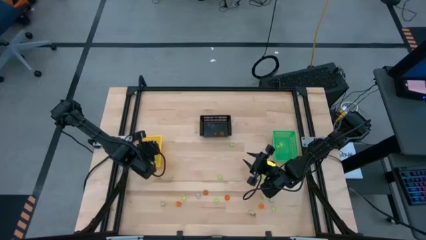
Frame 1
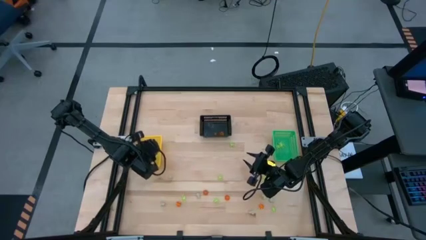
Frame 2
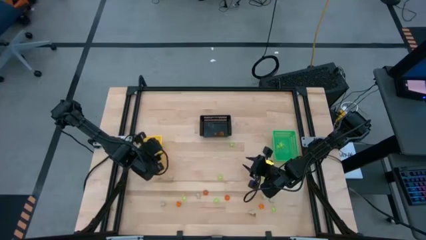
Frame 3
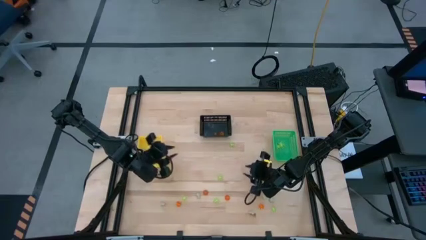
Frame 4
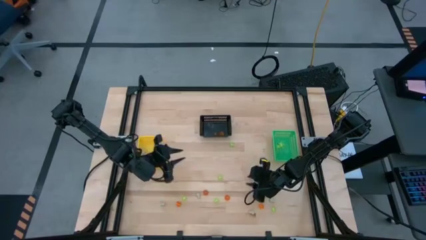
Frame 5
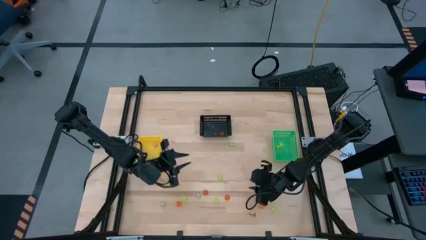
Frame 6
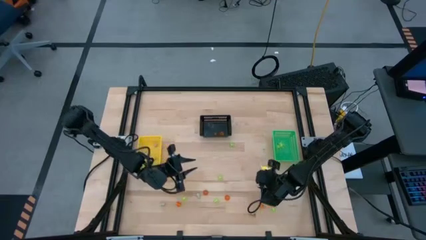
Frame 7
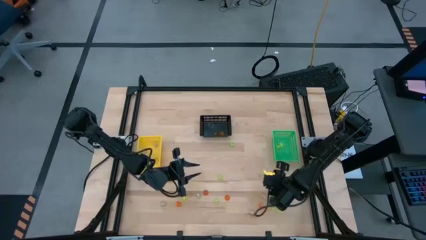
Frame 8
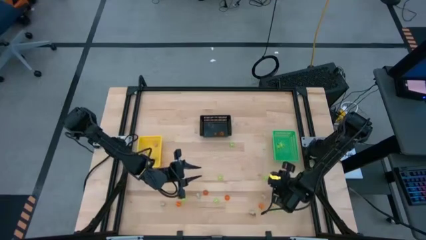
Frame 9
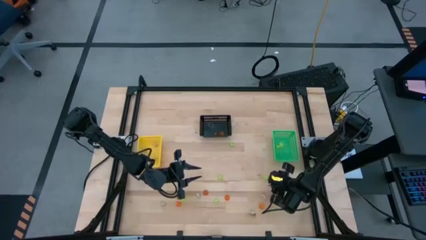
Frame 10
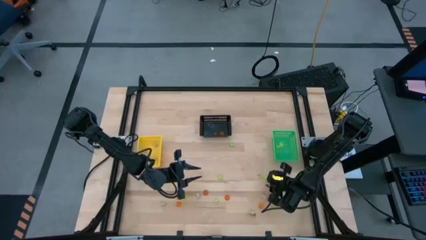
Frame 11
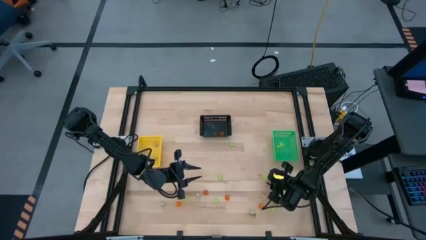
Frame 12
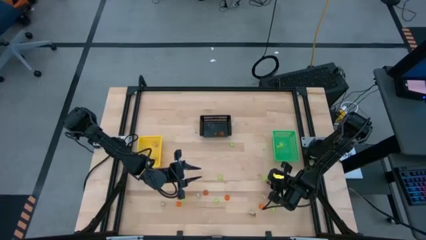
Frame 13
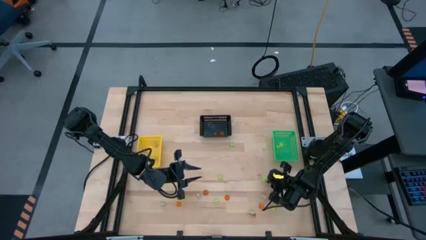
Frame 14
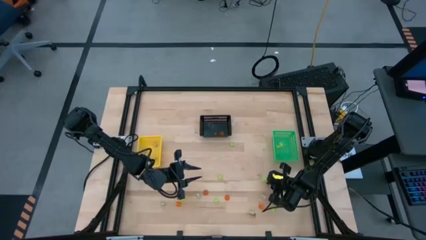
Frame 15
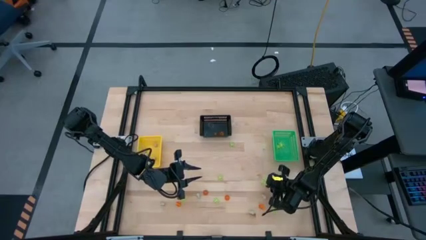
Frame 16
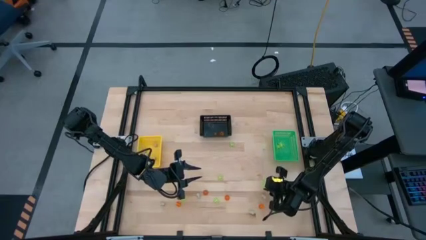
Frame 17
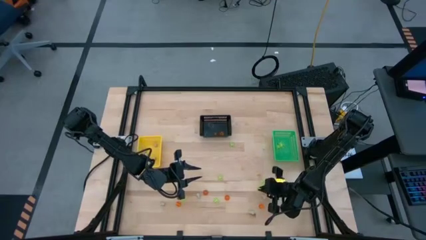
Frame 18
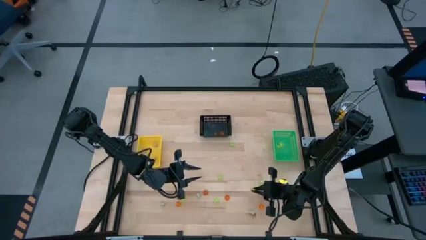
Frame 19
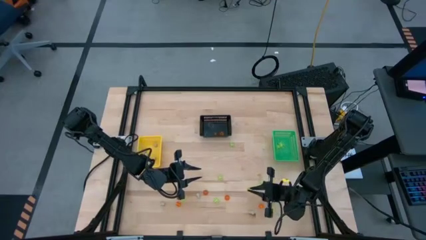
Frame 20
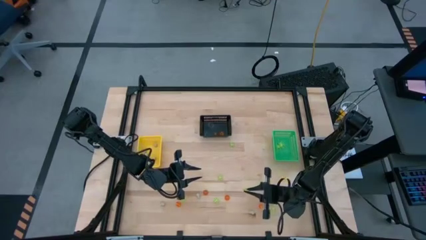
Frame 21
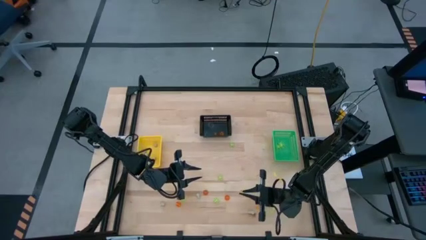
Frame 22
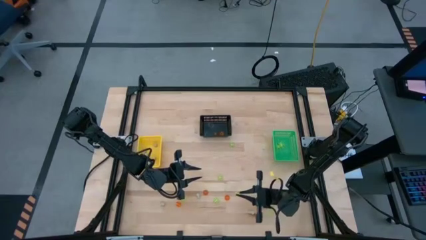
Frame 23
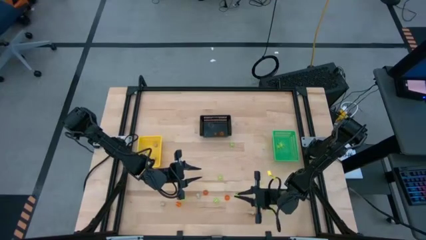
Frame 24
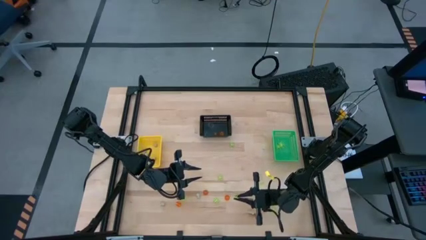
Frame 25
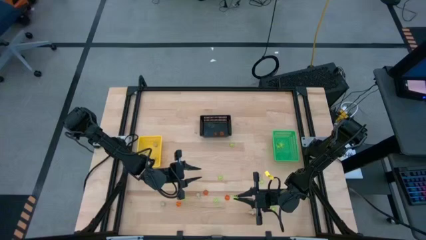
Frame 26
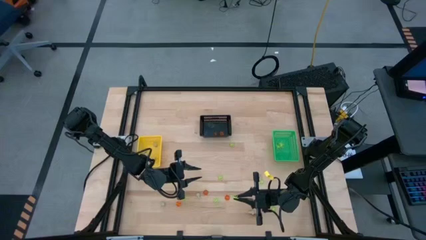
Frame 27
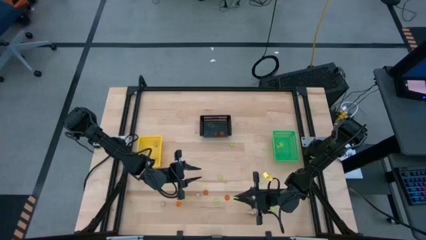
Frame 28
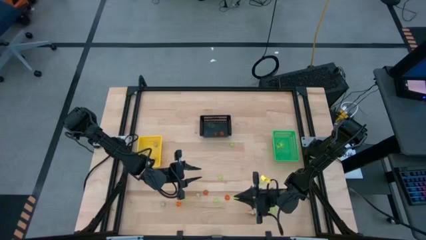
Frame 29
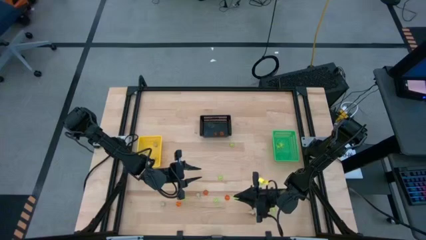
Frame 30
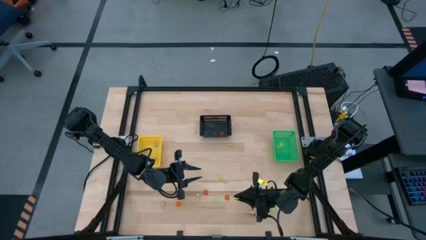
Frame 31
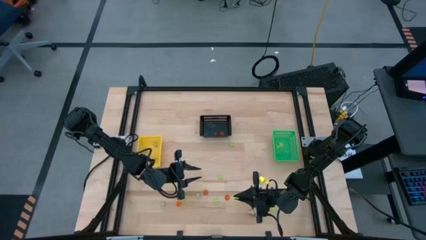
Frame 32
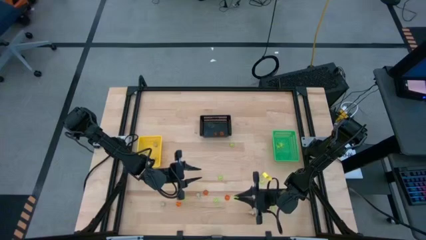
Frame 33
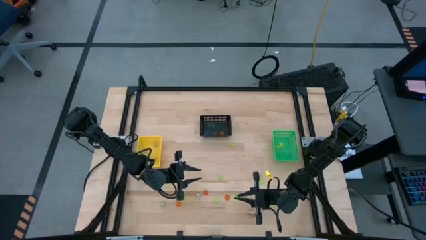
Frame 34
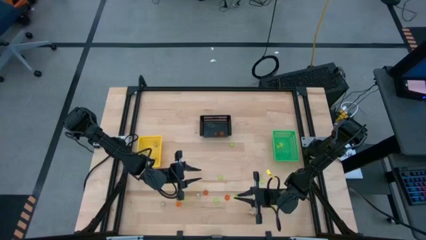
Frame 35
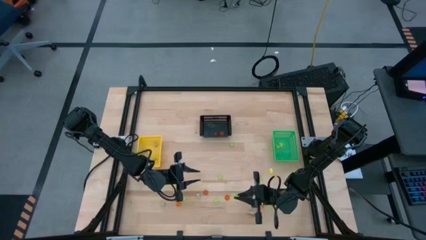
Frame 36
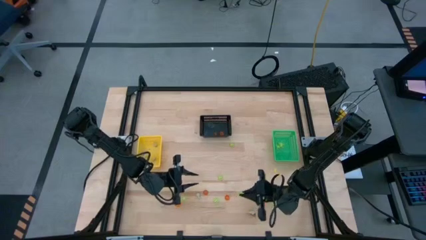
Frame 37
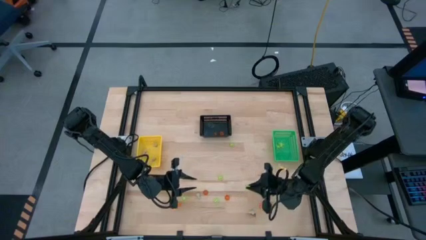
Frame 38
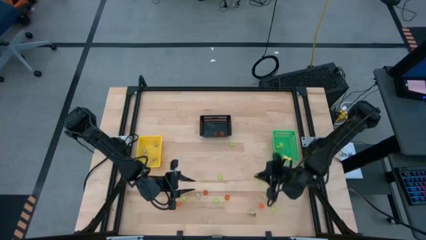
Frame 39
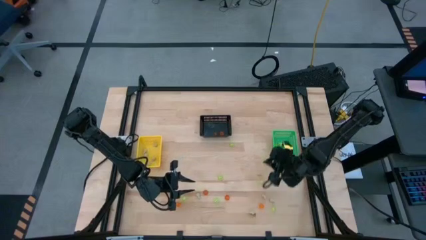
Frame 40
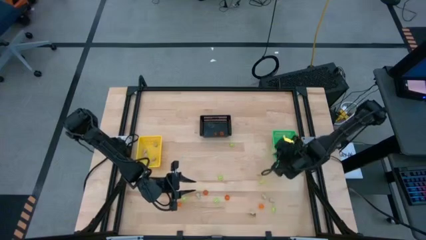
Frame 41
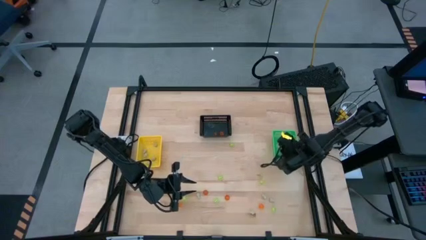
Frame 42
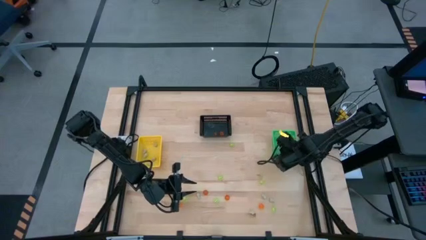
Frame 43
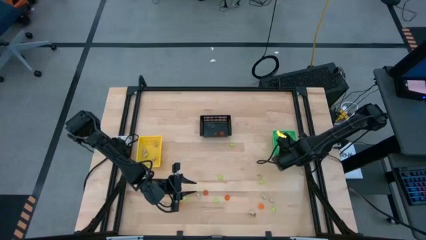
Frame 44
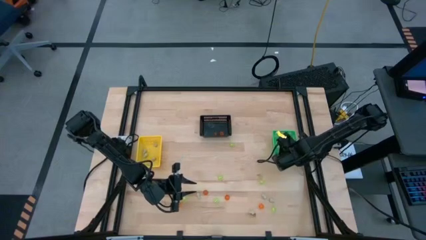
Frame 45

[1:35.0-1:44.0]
Task: Sort Halloween decoration
Put the green spider toy into the green bin

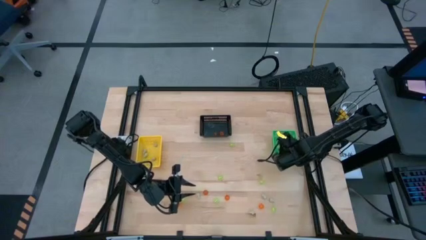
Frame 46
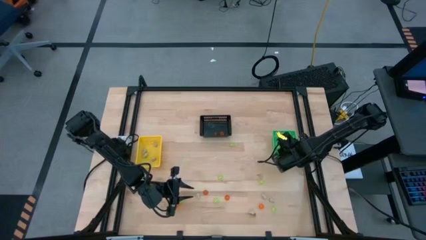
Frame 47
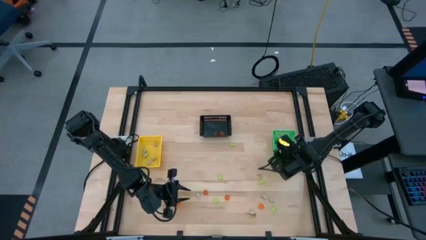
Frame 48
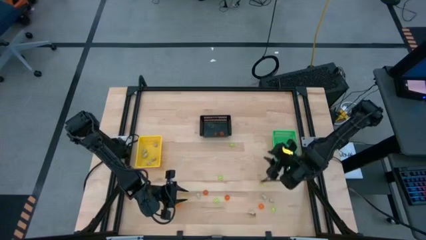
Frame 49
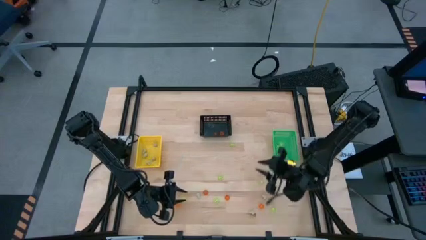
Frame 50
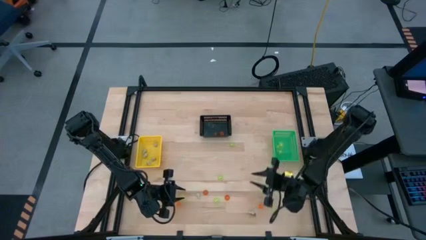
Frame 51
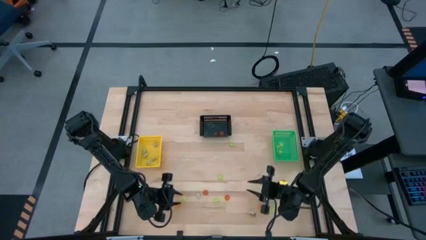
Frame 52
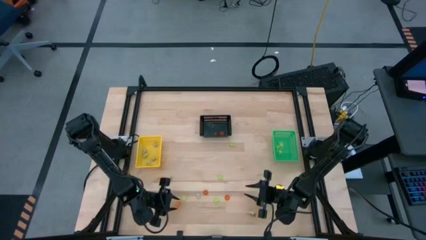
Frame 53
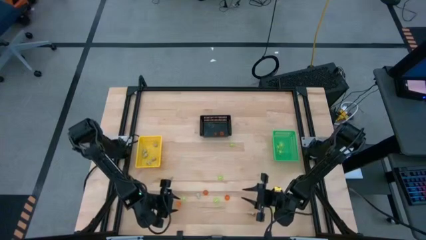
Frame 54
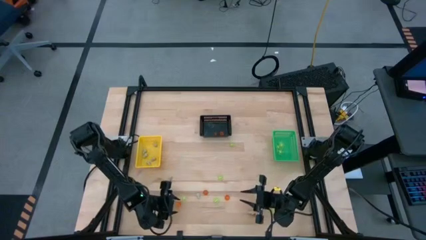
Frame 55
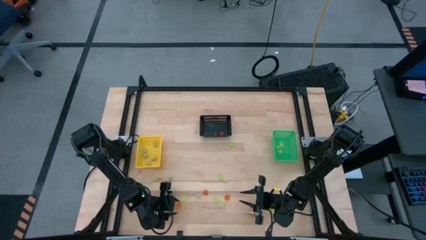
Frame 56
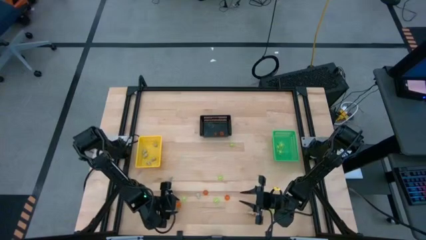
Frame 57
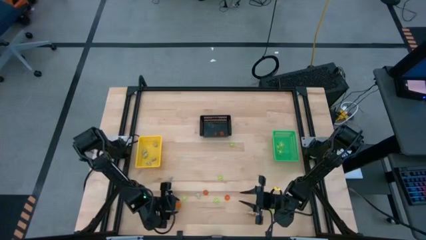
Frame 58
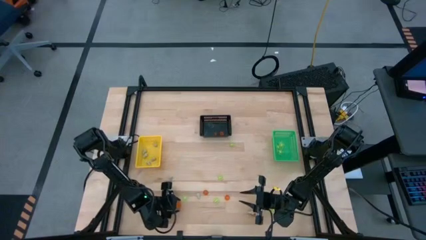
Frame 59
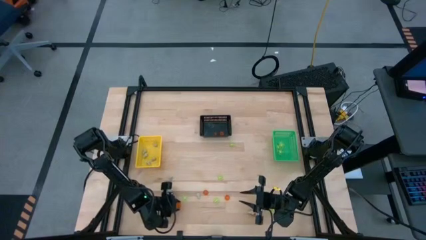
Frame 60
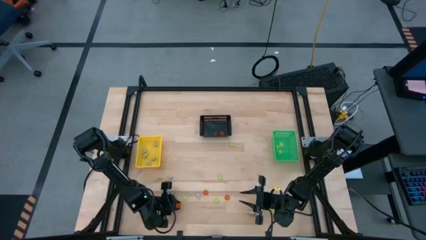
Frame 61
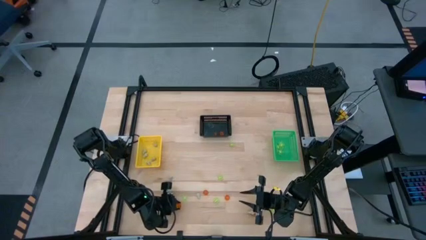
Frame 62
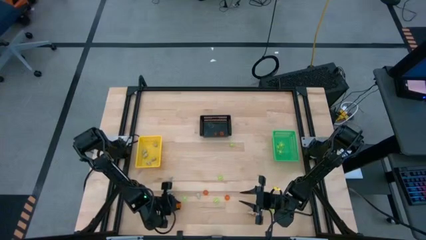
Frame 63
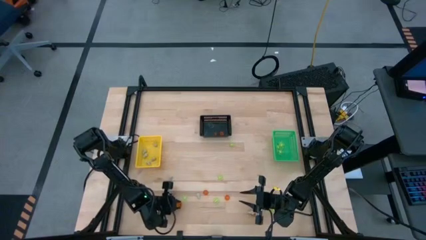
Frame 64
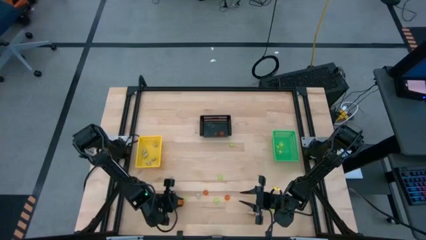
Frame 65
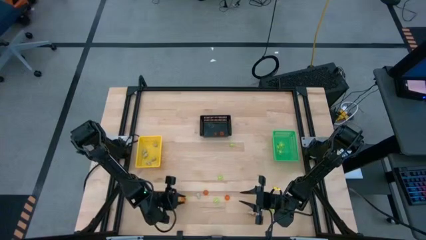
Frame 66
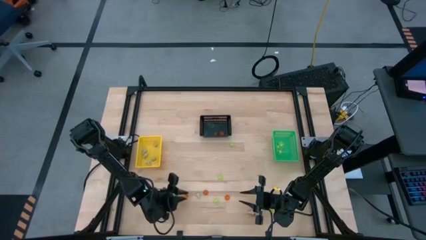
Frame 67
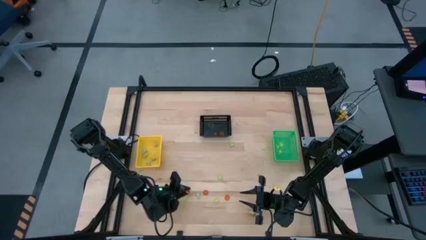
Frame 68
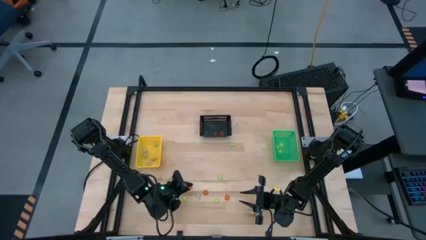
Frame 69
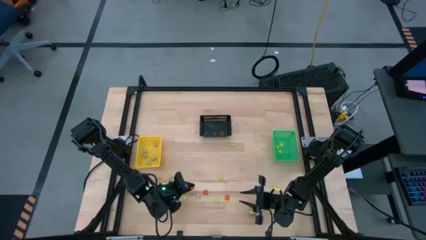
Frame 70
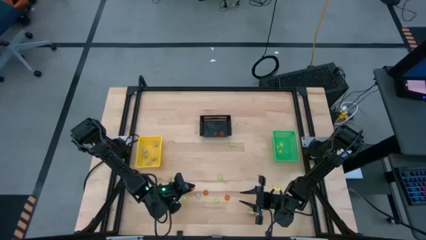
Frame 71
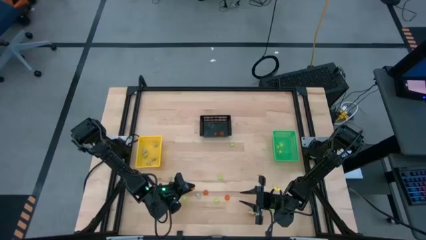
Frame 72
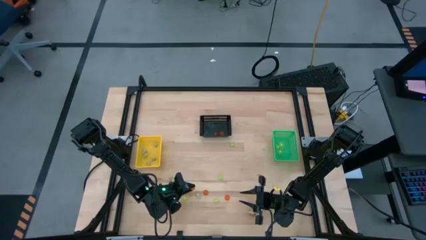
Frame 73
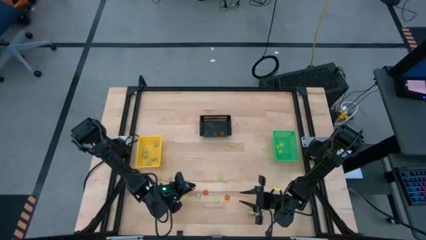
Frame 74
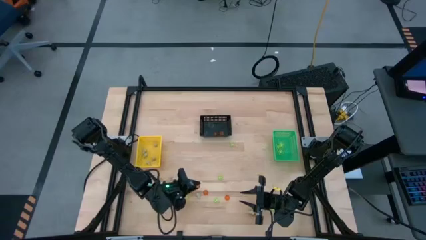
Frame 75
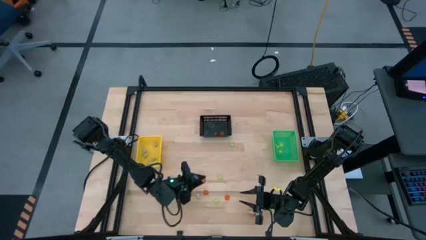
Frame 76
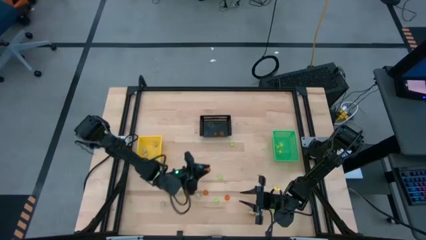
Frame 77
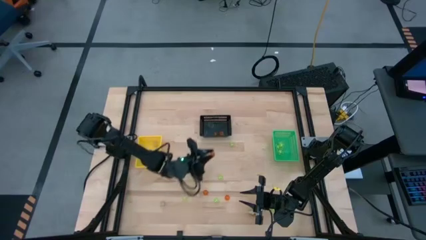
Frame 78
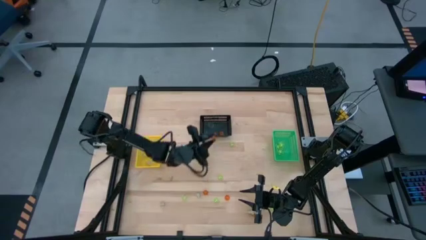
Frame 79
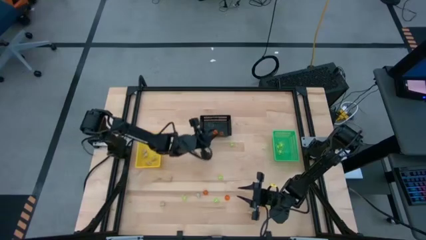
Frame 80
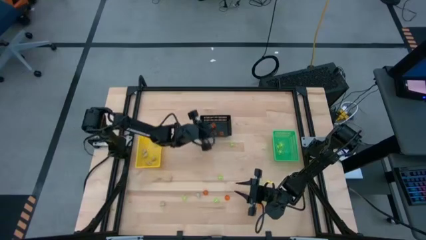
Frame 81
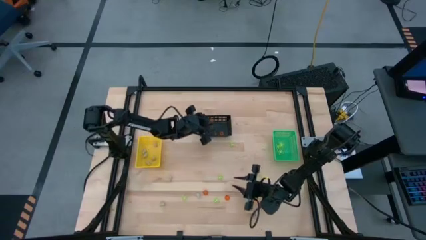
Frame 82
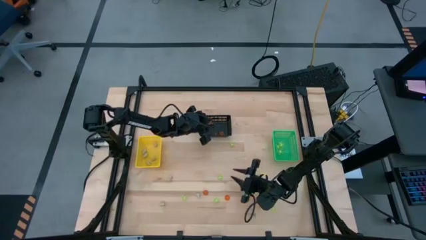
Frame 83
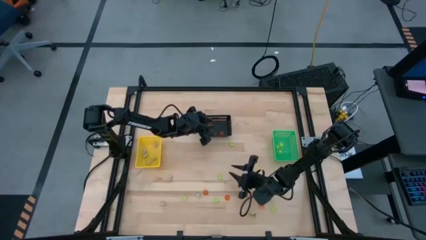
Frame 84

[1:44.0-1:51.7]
Put the orange pumpkin toy into the black bin
